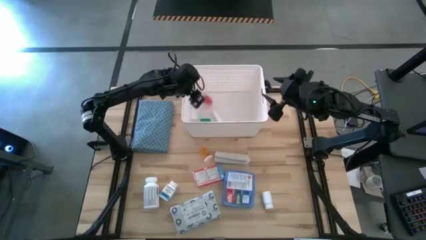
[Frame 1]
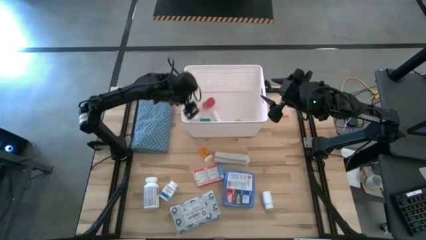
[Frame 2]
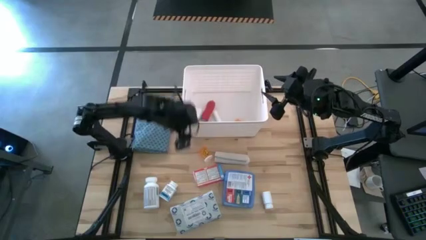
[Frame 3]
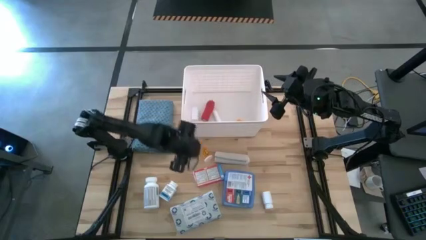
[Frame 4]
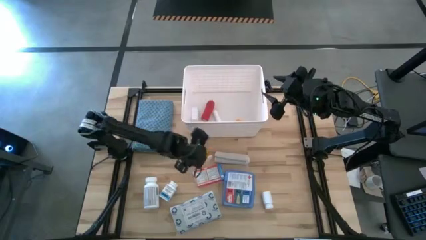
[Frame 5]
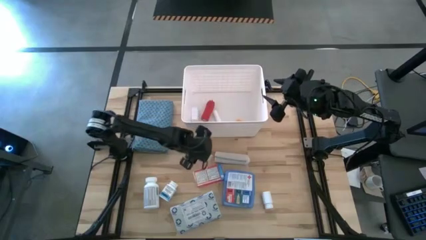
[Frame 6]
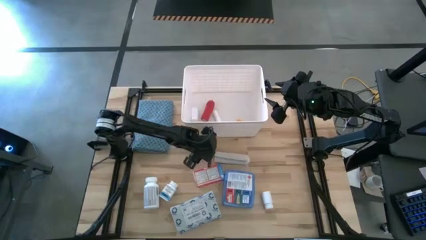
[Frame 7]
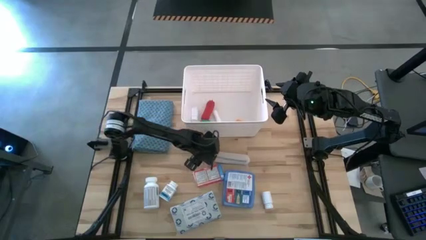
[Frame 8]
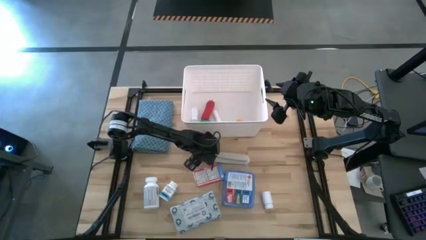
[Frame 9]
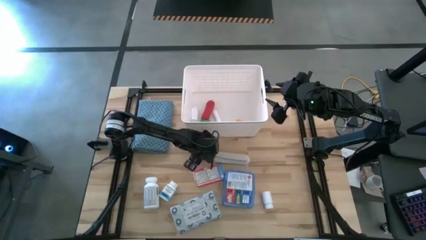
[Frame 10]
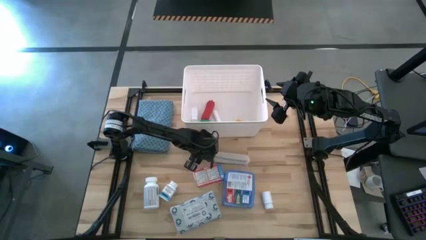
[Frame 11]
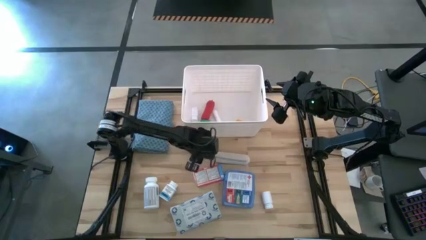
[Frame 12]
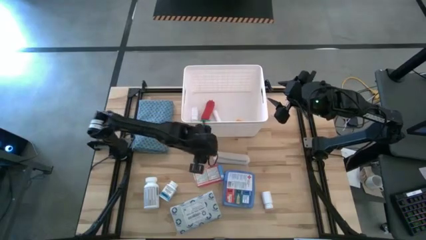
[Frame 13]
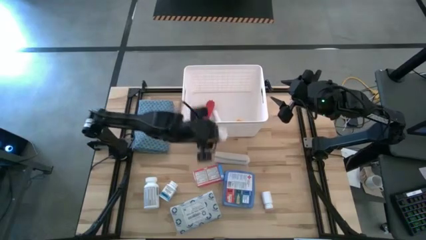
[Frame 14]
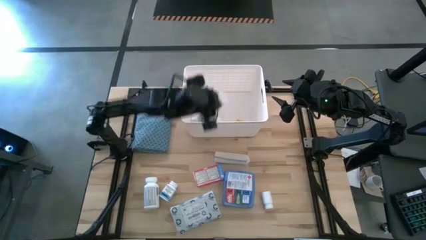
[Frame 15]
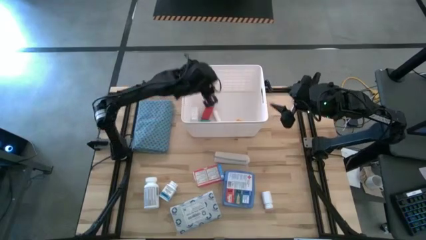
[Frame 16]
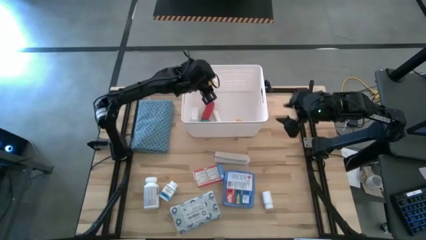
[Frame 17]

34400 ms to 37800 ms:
Task: Pick & place medical supplies in basket/bin
Put the orange medicine bottle into the white bin

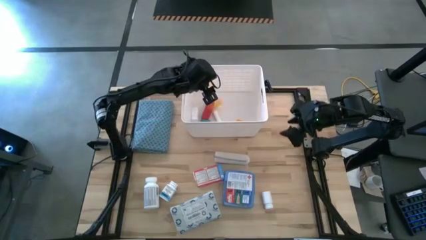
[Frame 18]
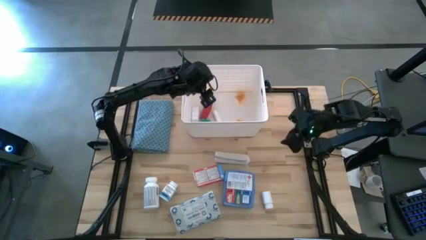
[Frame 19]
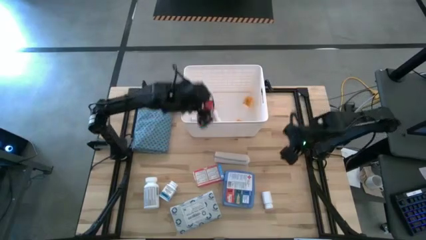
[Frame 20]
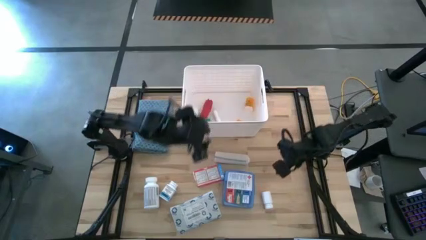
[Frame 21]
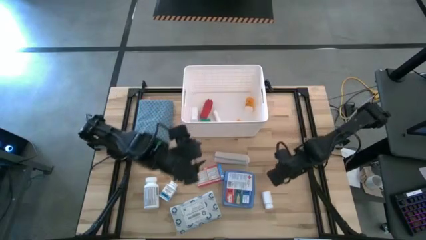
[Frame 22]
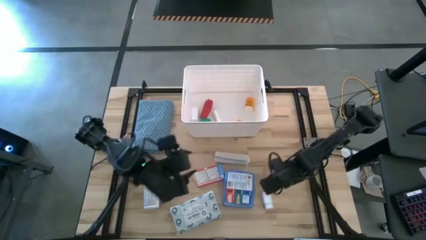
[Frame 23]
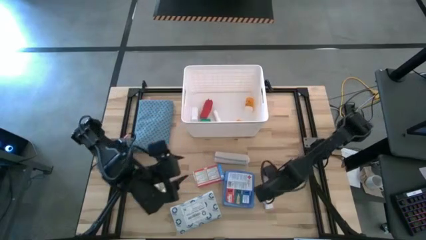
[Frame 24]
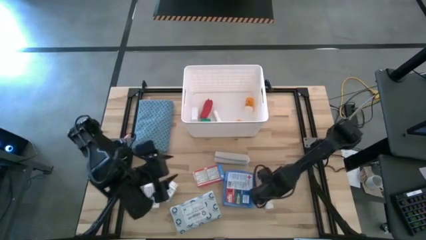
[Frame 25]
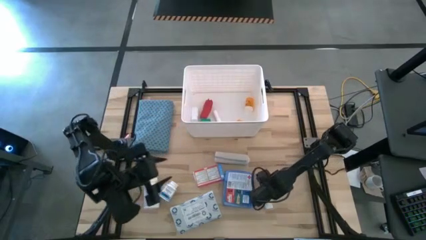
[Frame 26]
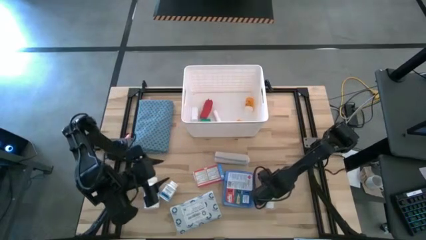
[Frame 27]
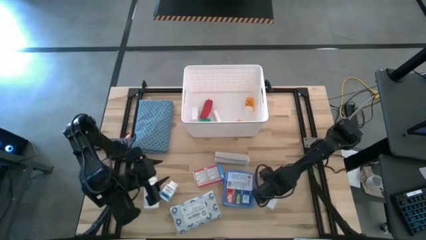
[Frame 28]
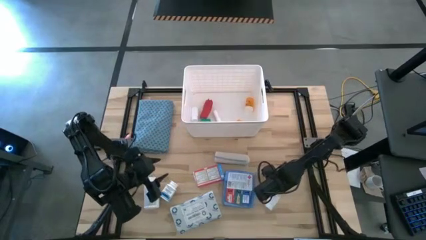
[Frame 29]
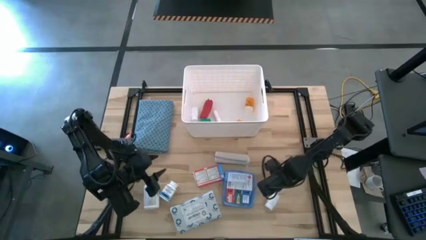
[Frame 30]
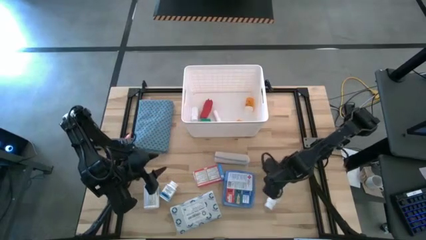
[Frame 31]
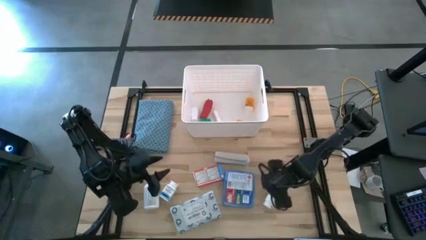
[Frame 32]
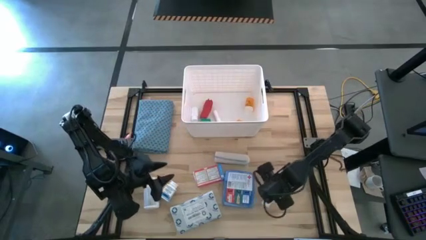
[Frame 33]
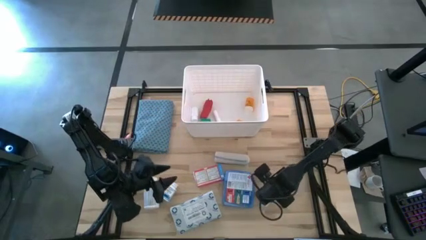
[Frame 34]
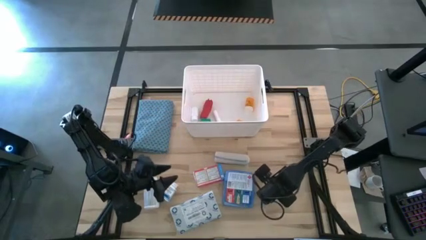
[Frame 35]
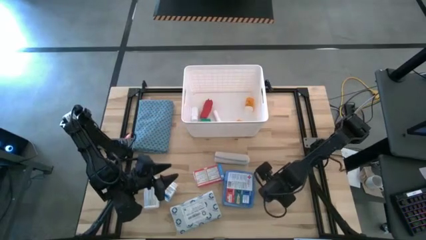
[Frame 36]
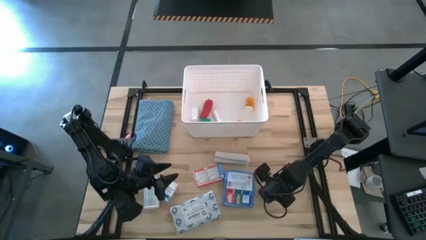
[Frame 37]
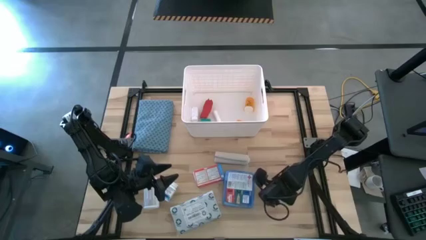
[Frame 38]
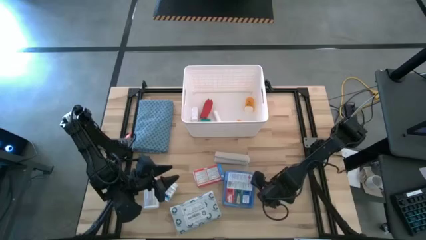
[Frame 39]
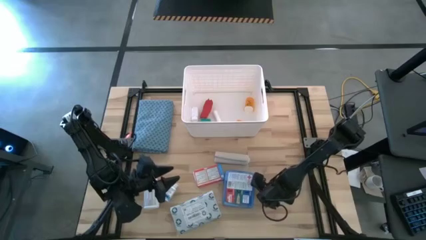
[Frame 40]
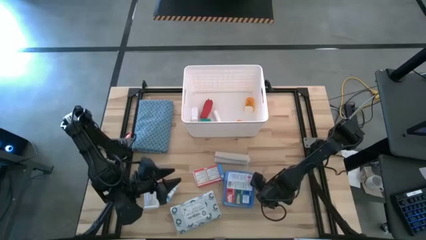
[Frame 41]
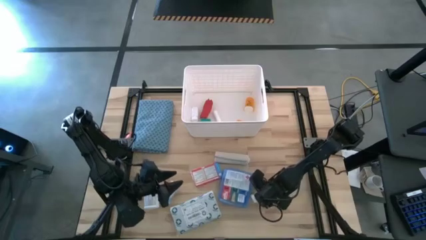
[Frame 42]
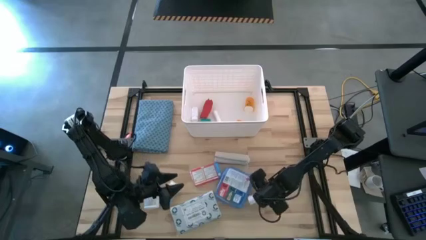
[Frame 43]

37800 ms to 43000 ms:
Put the white medicine bottle into the white bin

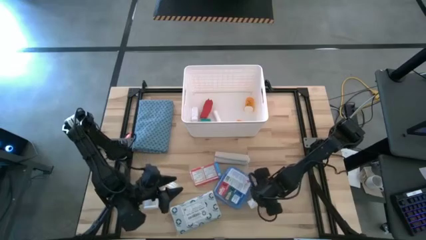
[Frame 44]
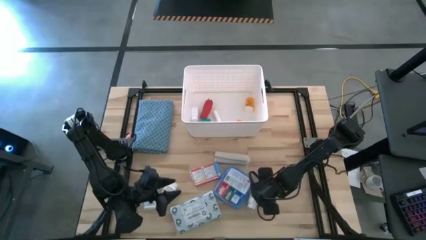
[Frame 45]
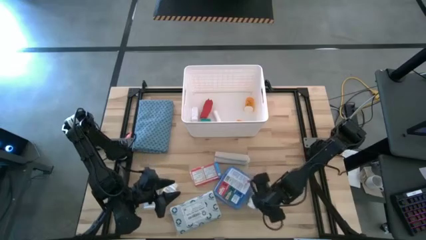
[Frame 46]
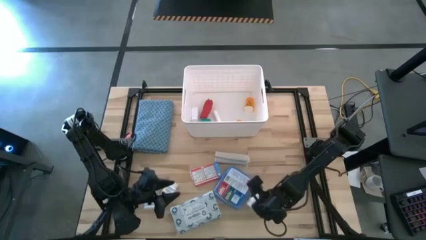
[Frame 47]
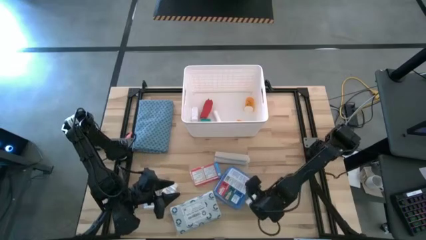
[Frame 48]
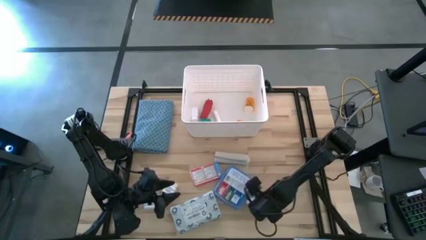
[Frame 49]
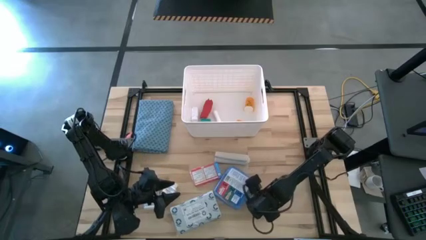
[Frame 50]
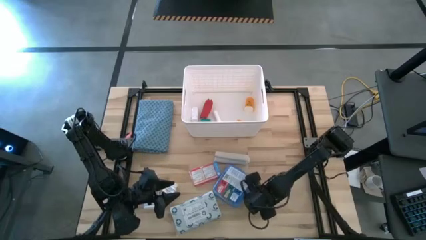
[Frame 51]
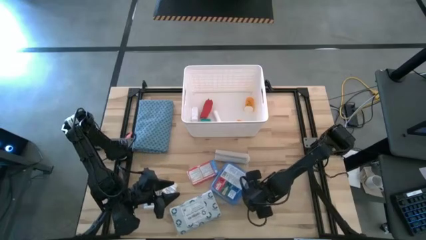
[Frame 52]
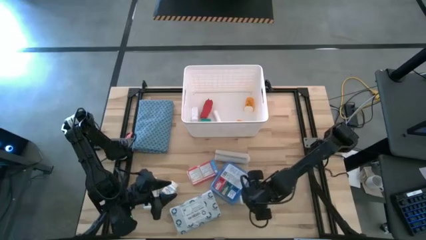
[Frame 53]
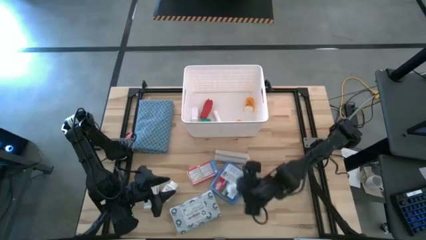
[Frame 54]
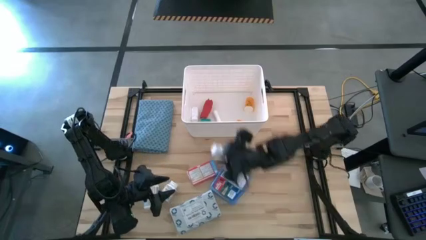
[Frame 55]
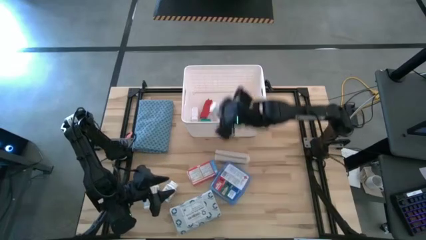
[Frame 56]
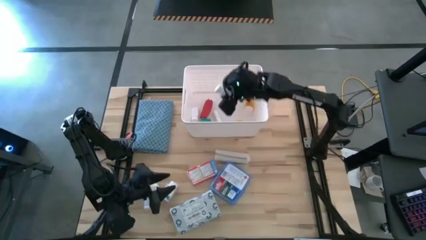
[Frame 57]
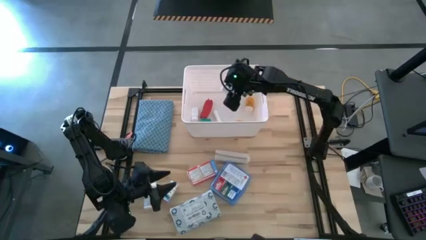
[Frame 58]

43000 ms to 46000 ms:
Put the white medicine bottle into the white bin

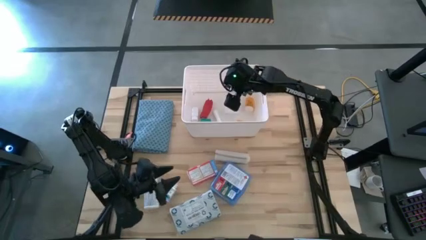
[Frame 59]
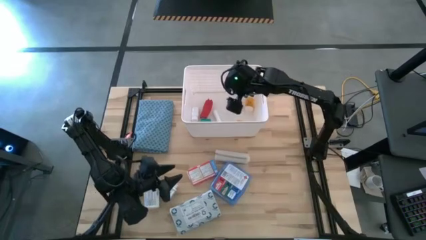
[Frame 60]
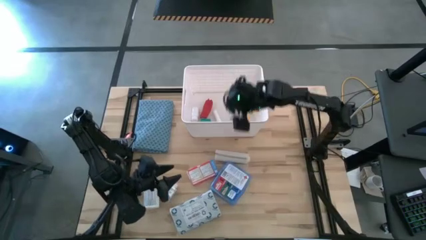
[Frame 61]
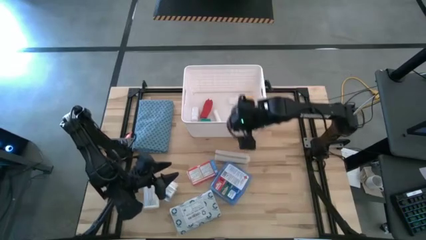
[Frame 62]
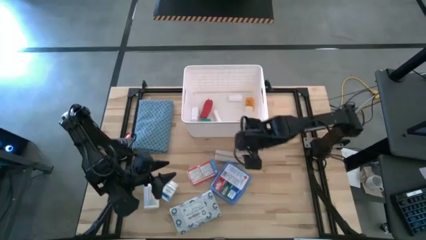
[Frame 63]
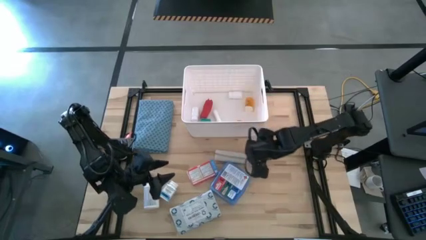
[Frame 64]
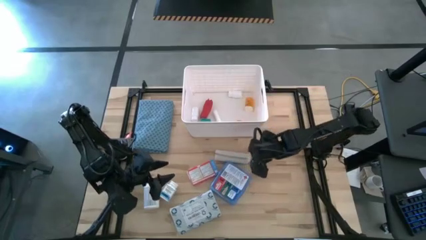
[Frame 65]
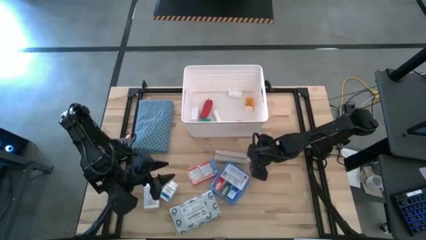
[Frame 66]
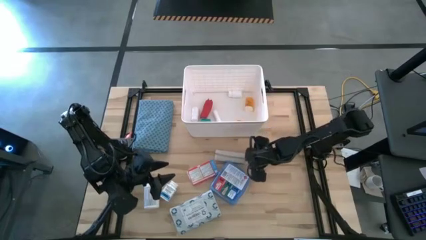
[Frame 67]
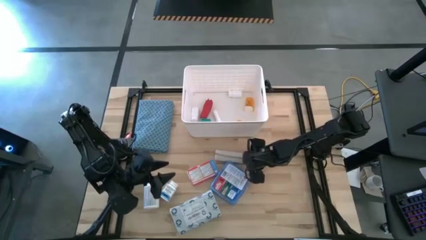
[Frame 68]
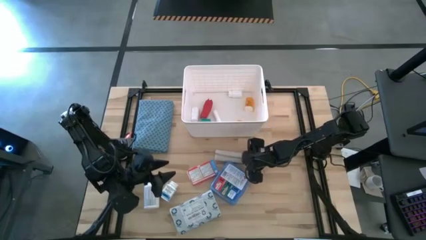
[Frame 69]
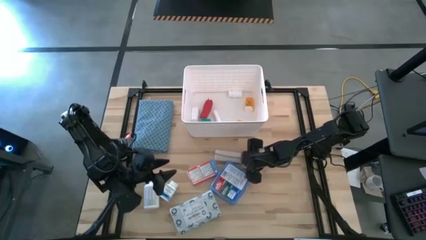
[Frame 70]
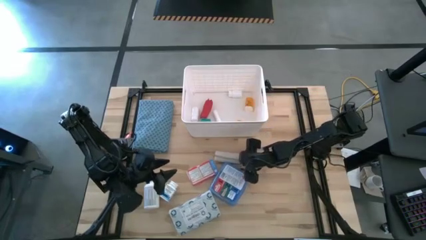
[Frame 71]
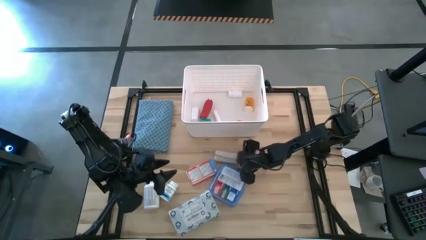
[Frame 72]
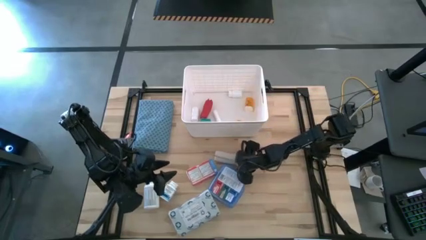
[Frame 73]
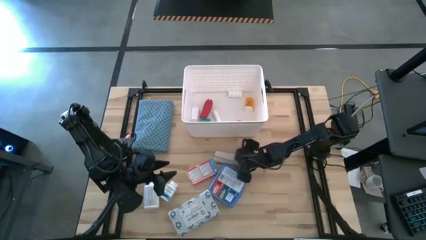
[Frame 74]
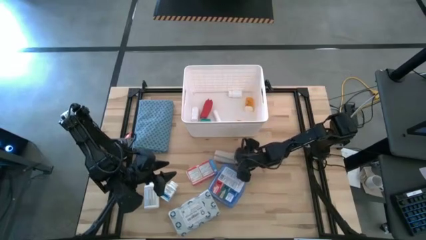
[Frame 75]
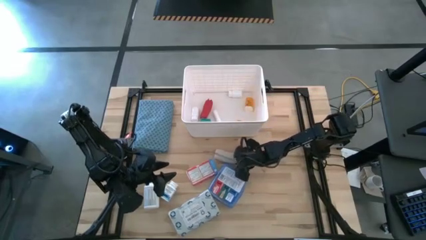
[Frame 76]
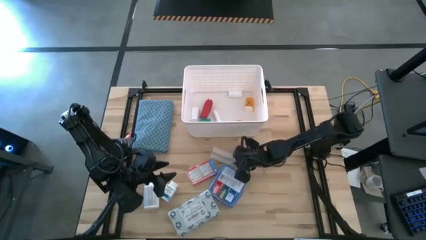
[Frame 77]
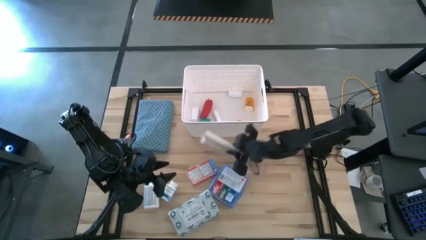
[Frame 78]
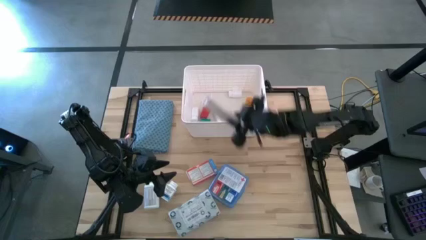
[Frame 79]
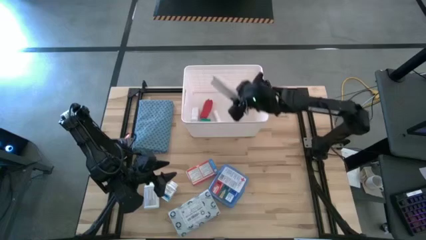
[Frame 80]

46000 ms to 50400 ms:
Put the white bandage into the white bin

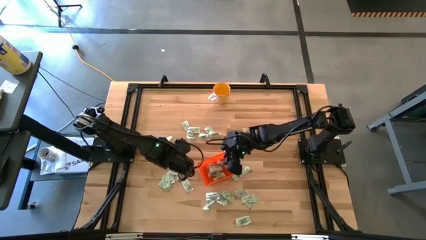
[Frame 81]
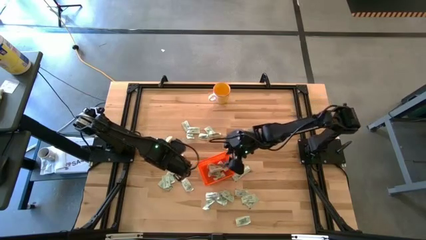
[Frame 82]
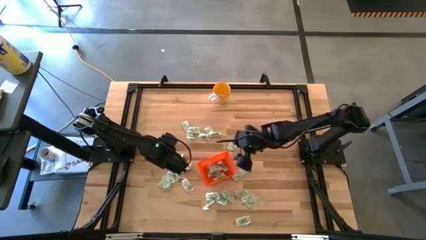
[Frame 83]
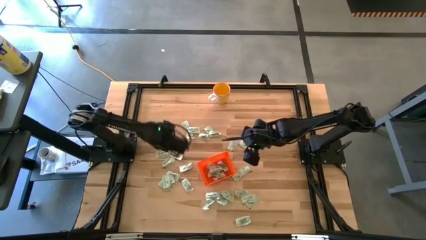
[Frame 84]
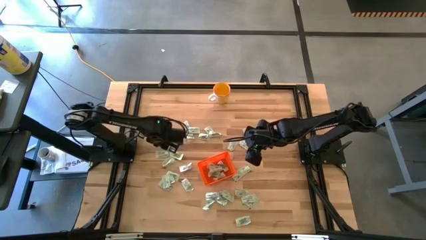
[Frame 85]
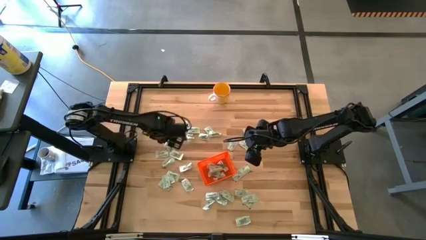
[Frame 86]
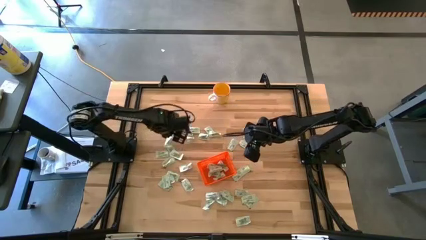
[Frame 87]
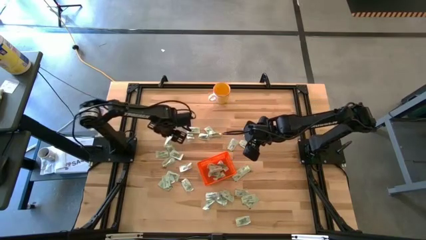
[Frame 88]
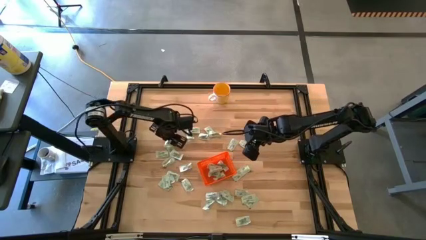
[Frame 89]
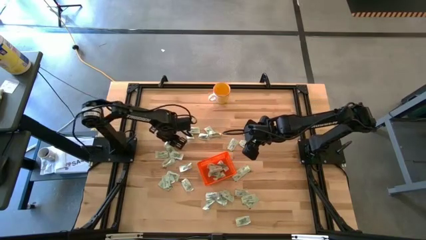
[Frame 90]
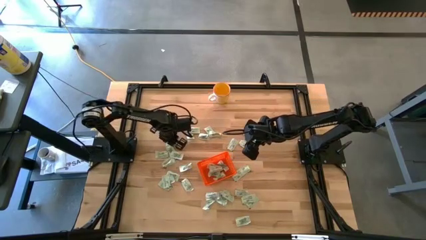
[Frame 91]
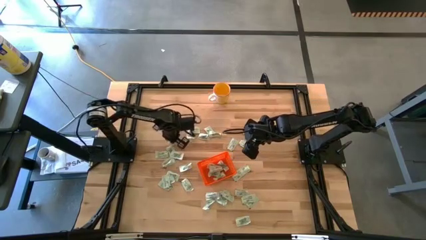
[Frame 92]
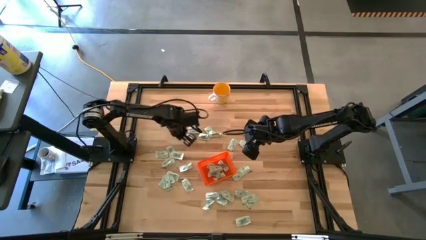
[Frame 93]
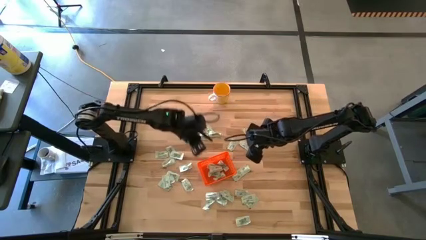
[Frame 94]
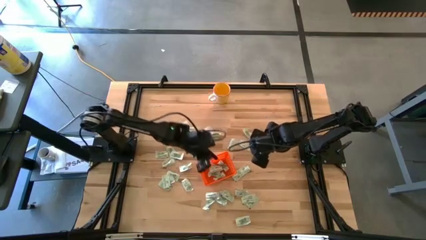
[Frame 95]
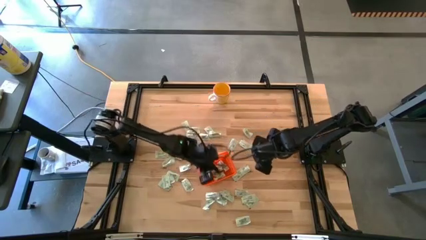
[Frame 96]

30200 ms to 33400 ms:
Task: Pick and place Stevia / Truvia into bins
Put the stevia packet into the bin
